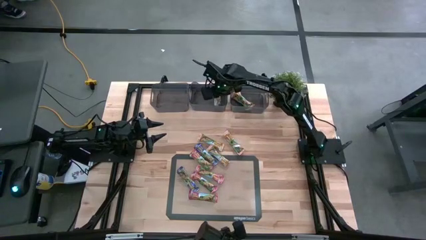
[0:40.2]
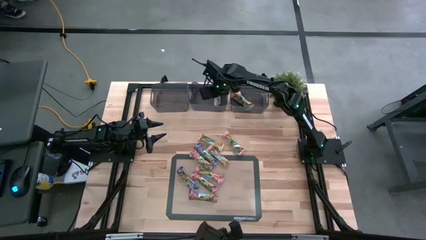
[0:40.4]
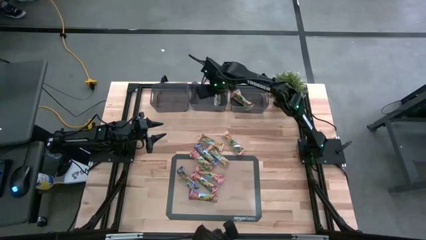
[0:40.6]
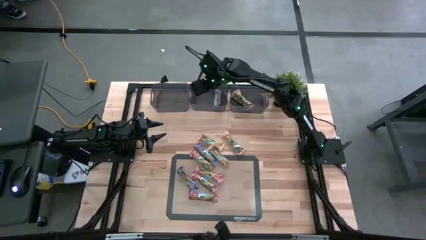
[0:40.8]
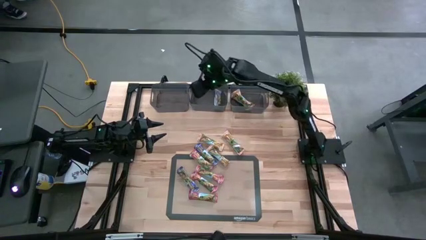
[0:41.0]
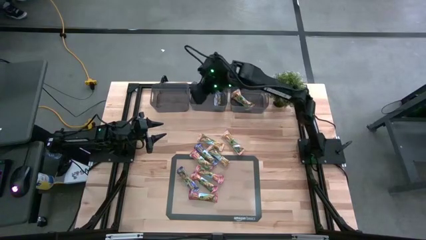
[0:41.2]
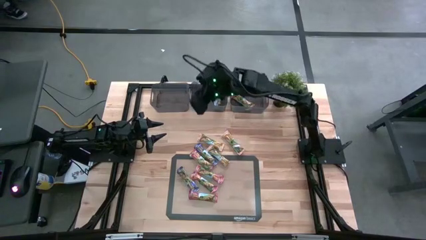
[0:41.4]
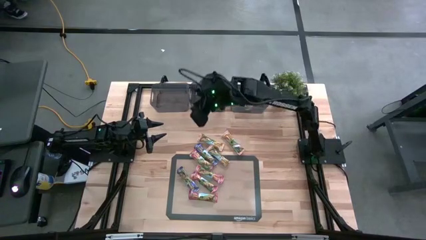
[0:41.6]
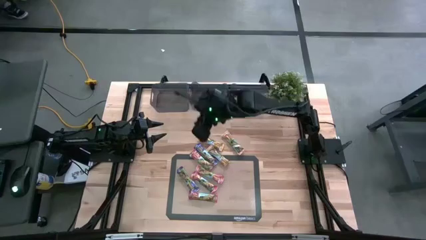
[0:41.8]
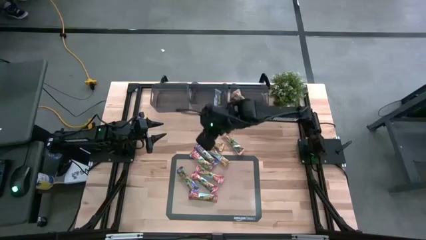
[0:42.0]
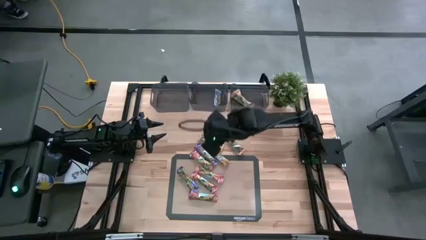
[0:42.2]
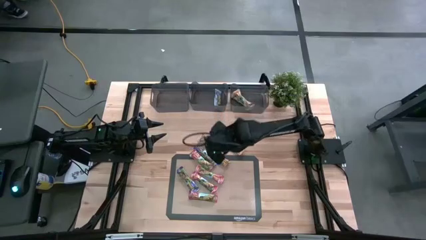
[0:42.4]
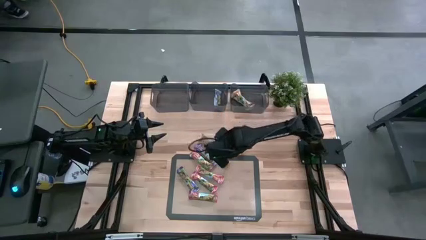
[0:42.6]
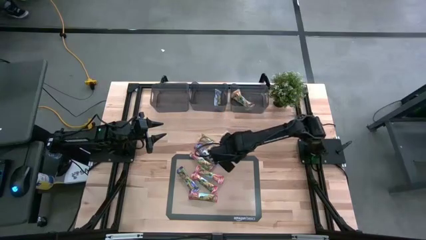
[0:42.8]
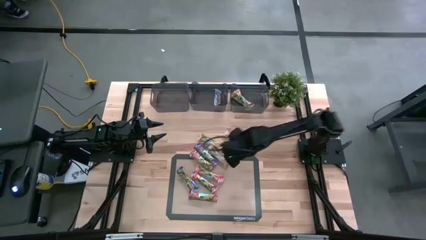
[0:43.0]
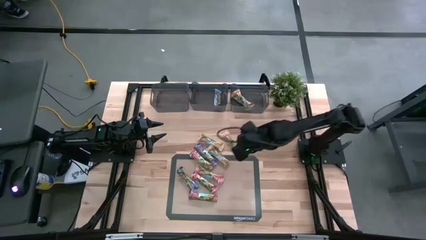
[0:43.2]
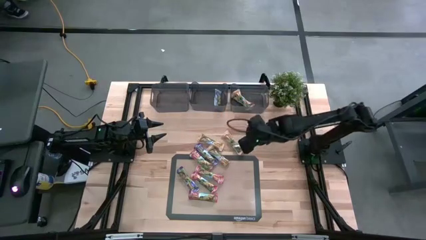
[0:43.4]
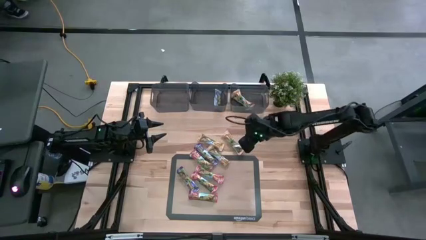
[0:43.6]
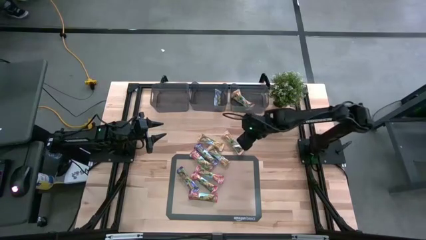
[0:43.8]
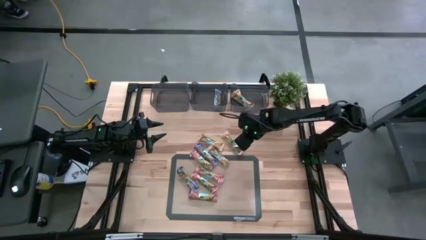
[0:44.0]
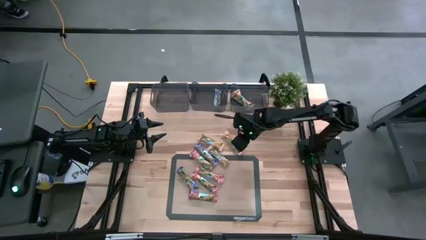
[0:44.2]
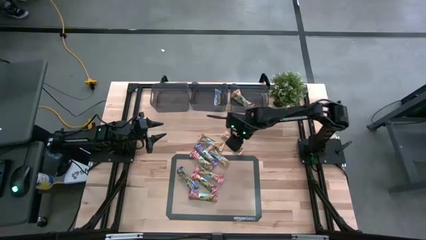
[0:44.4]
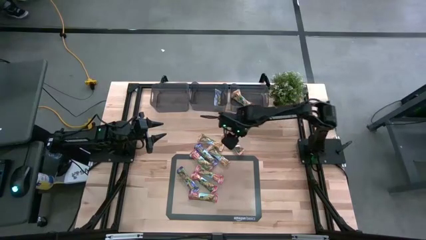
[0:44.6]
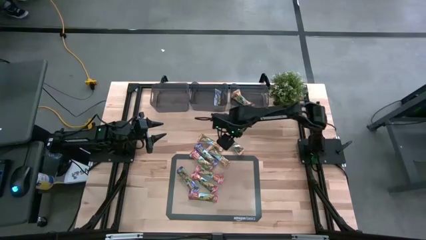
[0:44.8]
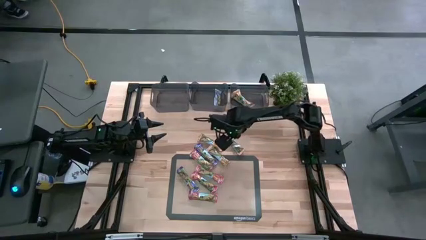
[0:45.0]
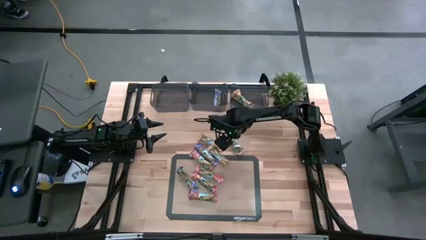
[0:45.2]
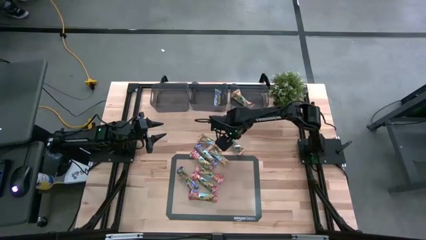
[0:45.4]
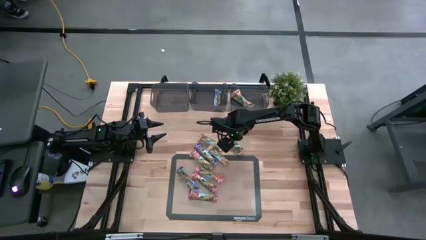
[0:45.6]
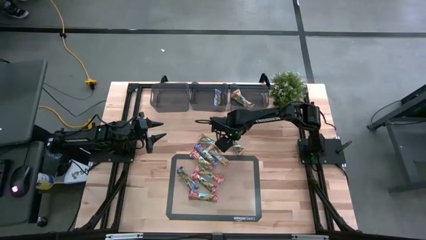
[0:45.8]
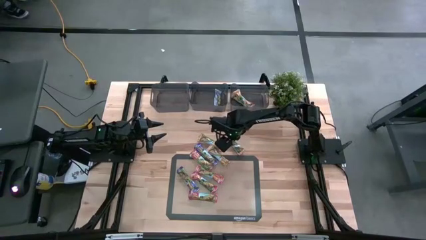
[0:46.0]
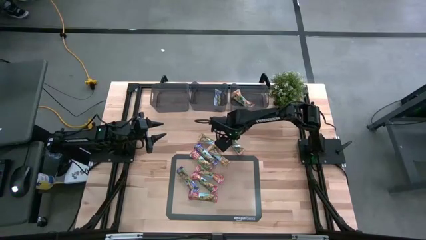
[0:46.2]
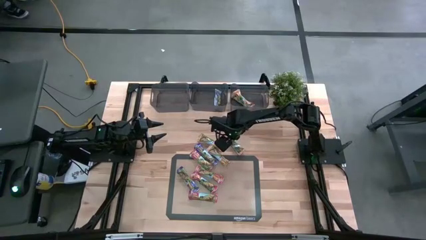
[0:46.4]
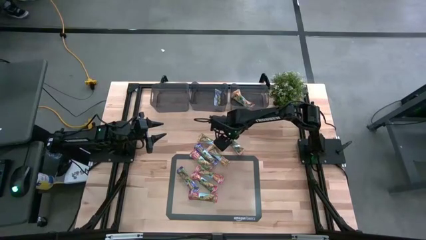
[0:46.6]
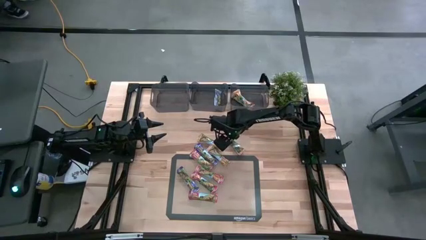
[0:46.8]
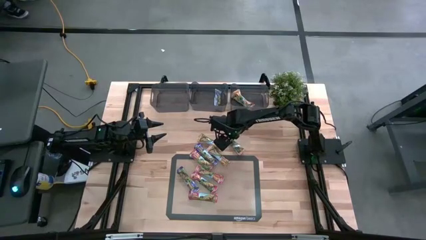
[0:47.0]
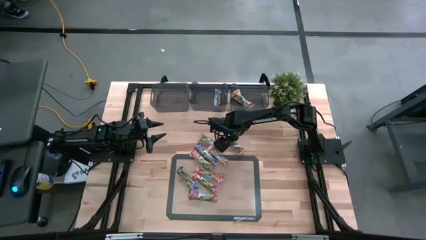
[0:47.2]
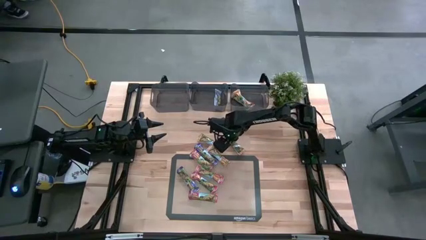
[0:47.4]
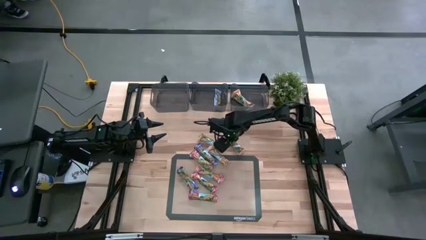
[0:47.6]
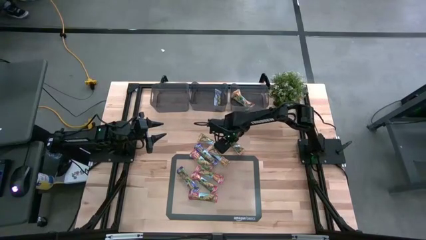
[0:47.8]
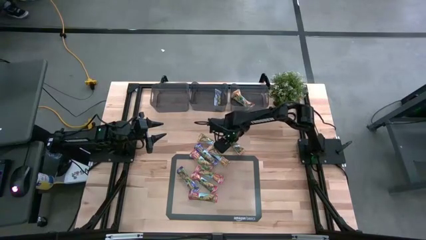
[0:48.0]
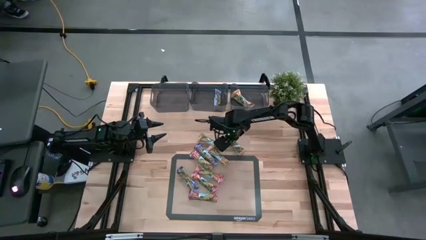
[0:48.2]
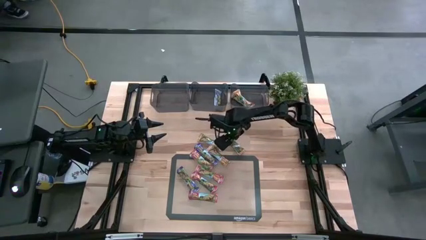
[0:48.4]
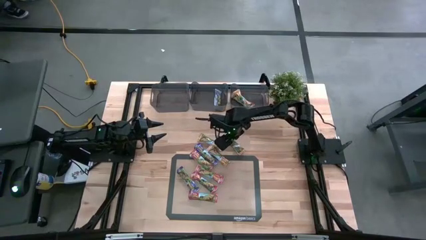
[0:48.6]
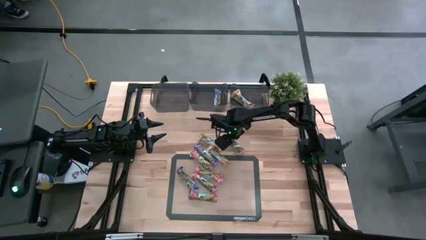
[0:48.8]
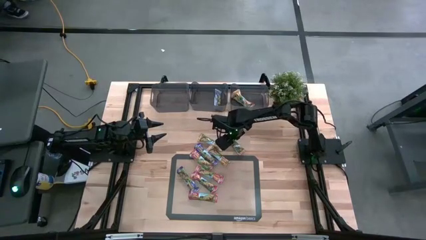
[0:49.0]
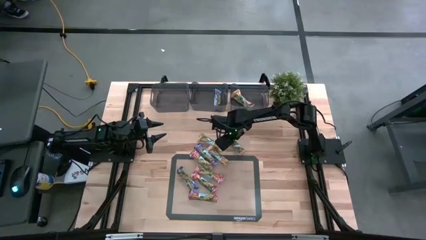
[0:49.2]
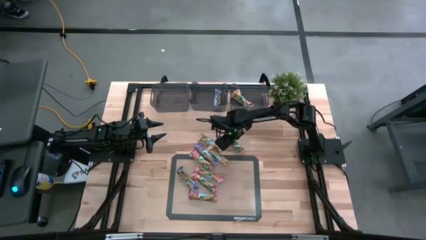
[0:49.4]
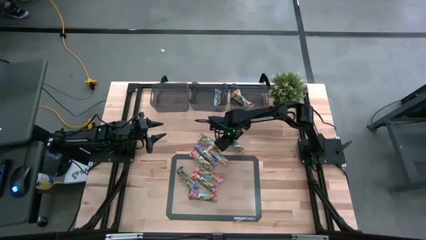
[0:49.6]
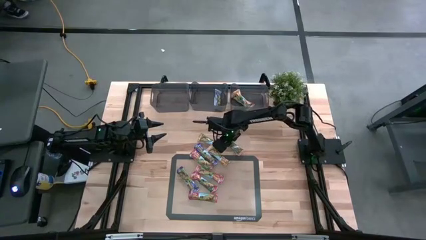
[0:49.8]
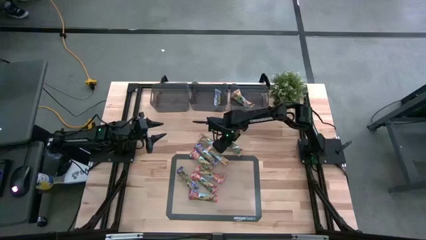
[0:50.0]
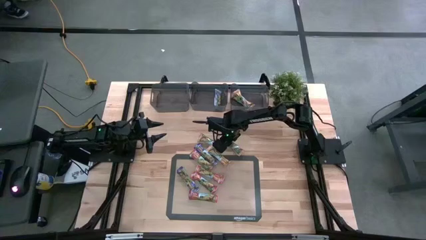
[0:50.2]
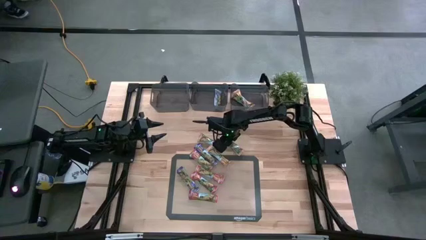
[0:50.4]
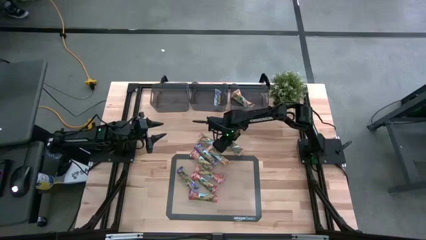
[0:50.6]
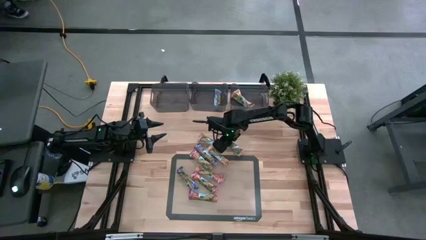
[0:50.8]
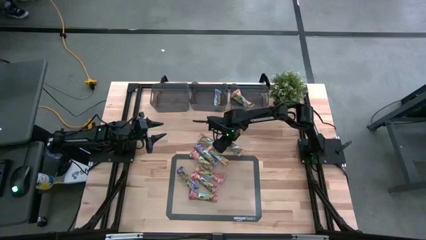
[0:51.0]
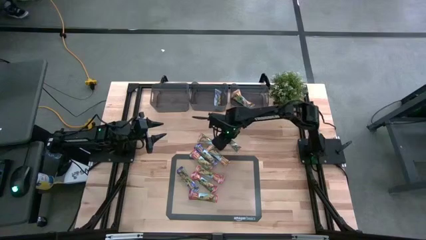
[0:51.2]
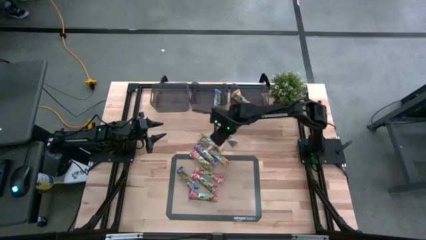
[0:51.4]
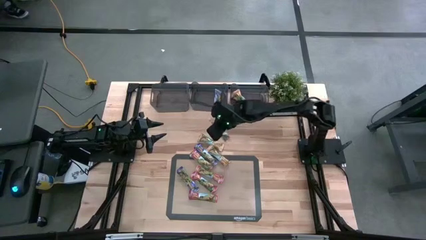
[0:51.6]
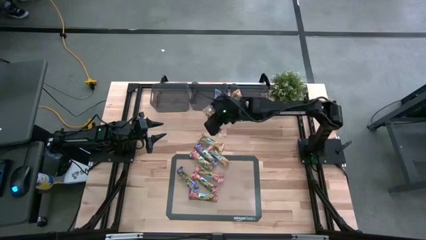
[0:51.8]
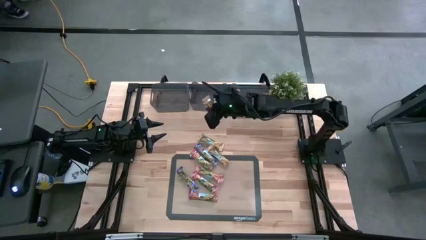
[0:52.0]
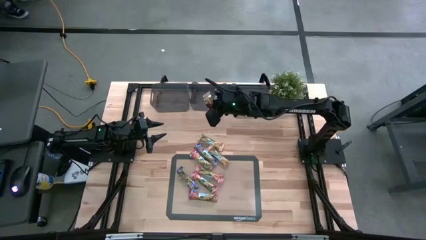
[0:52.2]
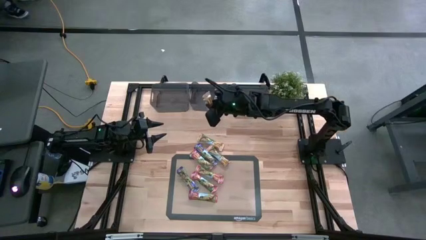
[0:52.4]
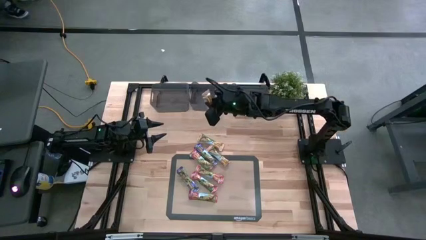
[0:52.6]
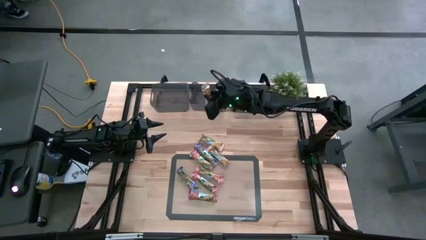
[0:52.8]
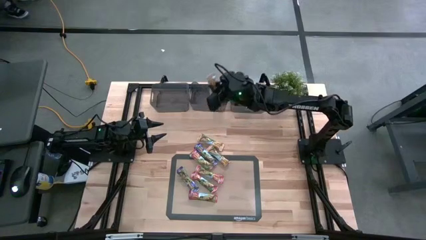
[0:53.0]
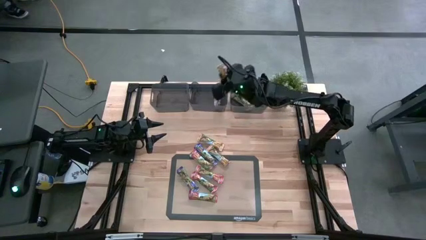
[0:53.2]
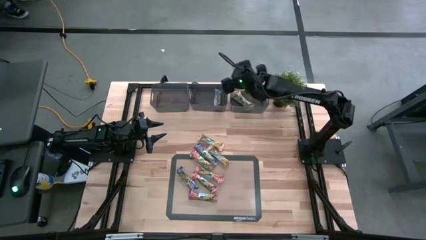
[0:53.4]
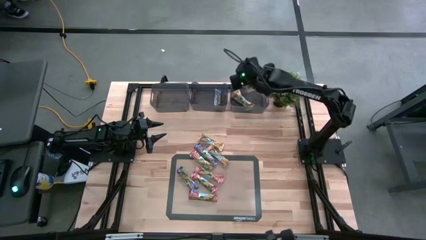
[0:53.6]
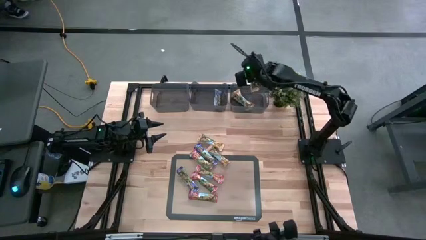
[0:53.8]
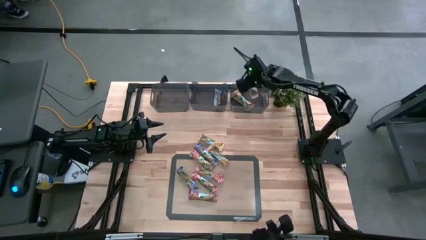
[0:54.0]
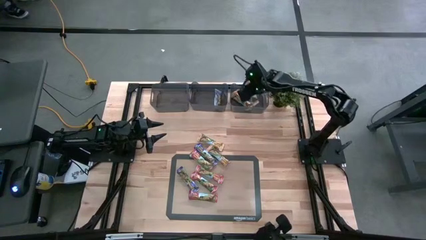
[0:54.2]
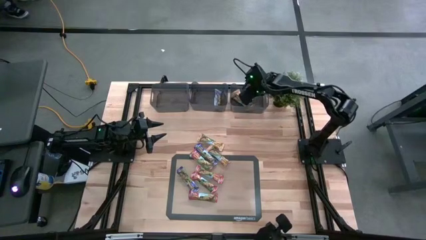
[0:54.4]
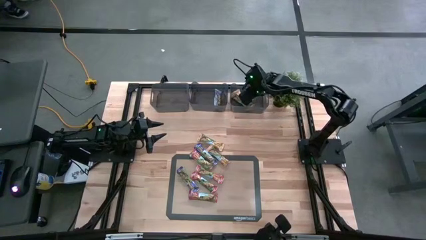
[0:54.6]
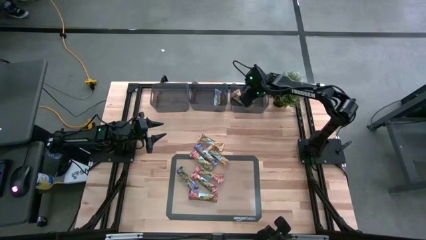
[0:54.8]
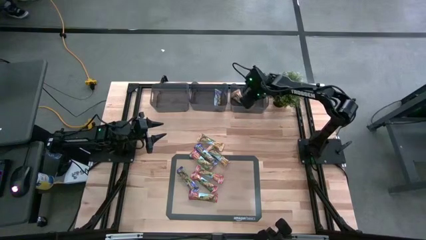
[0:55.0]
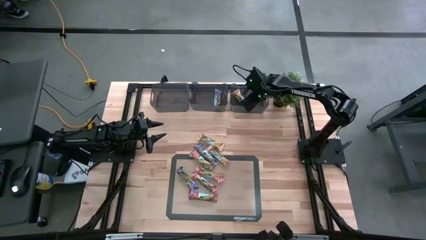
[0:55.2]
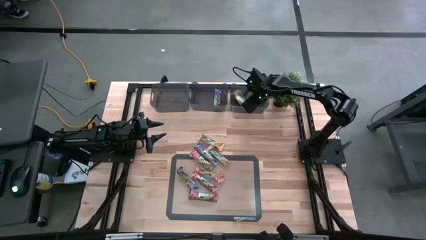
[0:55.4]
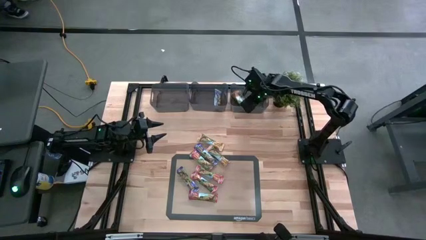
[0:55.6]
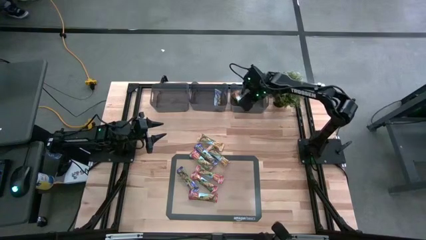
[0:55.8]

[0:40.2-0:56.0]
Task: Pick and place Granola Bars by type
Put the yellow granola bar into the right black bin

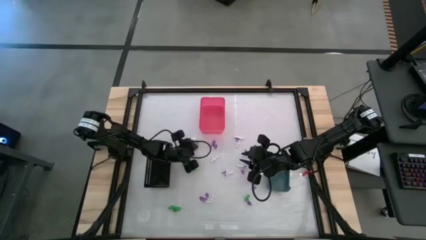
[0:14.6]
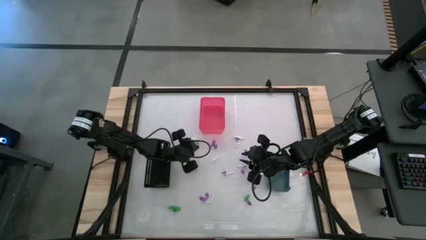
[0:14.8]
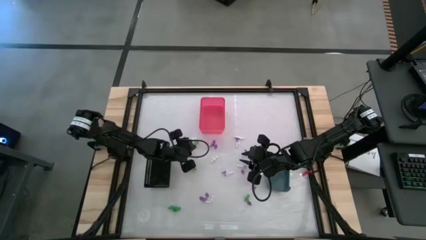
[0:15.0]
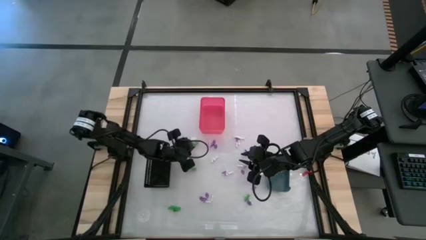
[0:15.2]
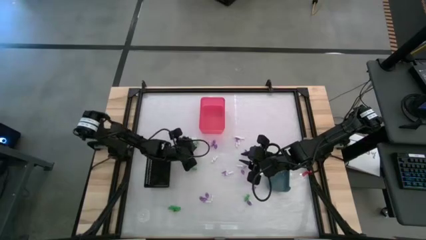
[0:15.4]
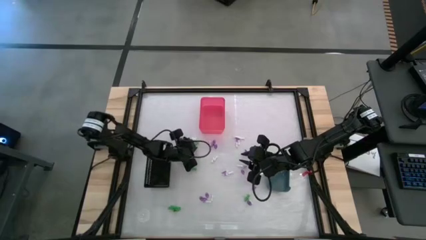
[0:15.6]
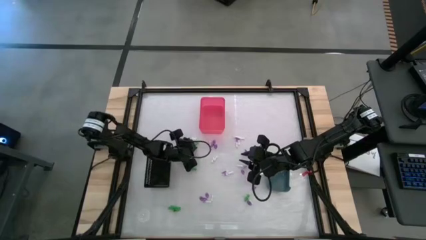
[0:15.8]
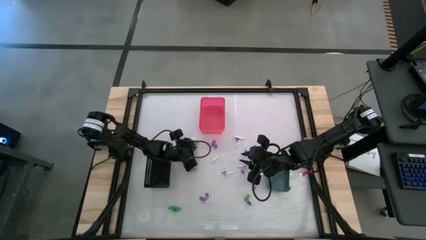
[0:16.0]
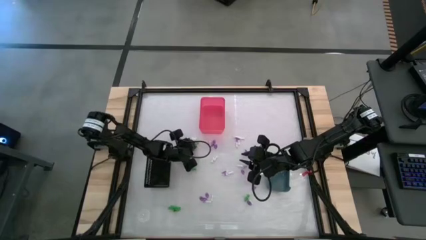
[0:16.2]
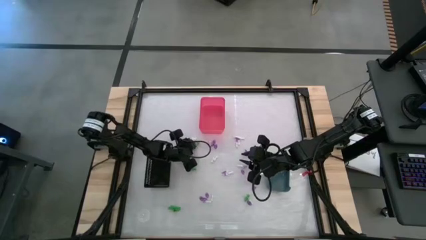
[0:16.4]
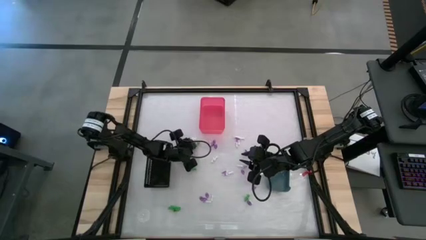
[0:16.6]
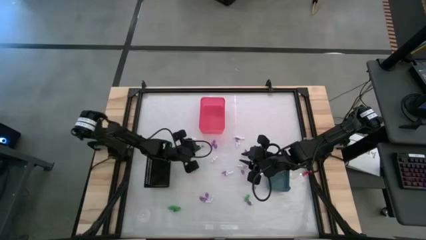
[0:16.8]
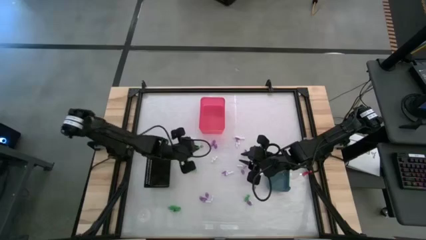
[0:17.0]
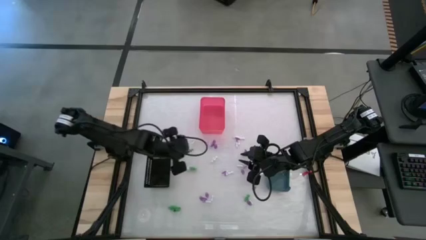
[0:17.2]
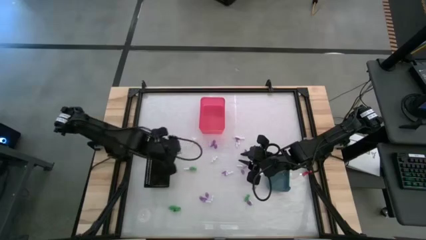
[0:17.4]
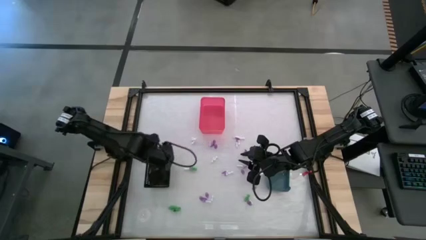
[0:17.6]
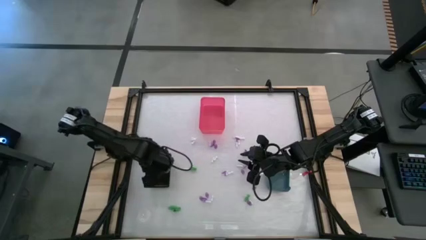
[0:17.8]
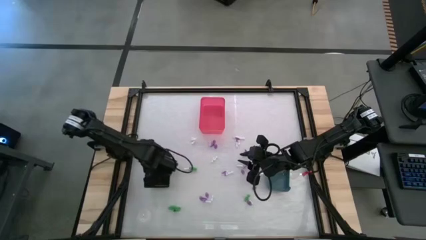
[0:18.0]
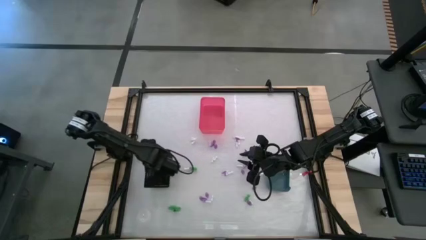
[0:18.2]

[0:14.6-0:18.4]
Task: Sort Halloween decoration
Put the skeleton toy into the black basket
